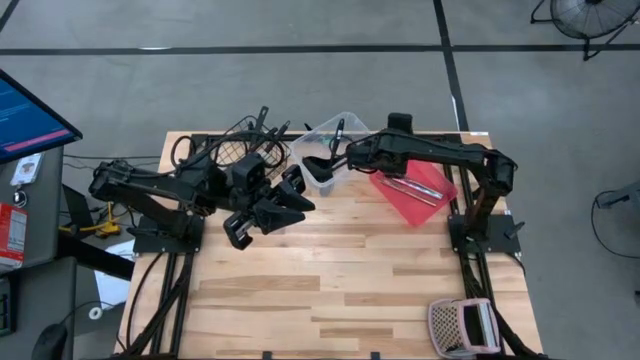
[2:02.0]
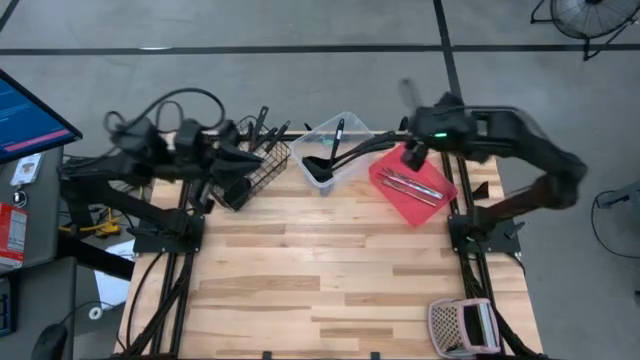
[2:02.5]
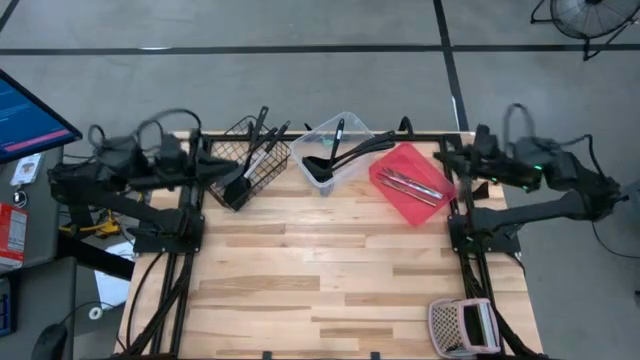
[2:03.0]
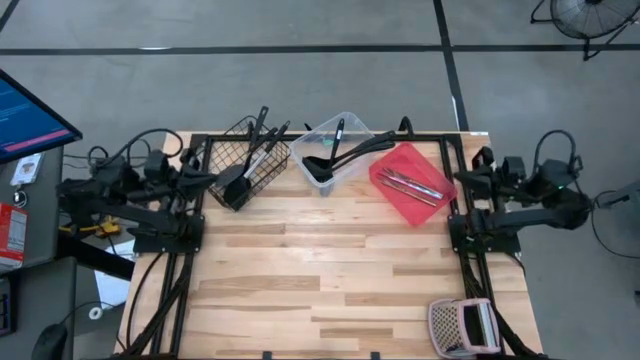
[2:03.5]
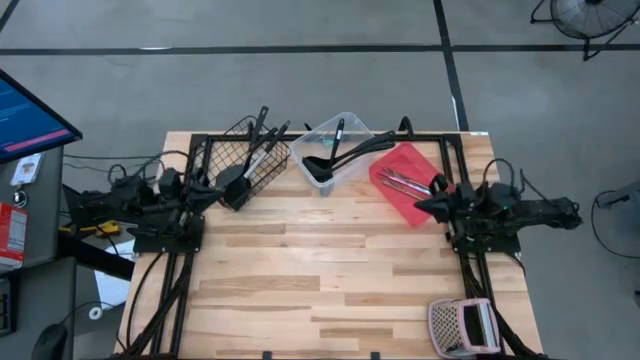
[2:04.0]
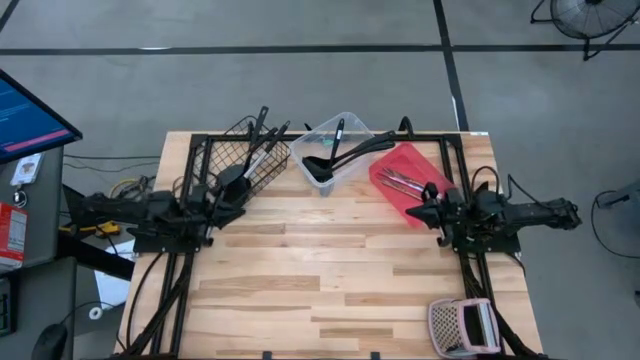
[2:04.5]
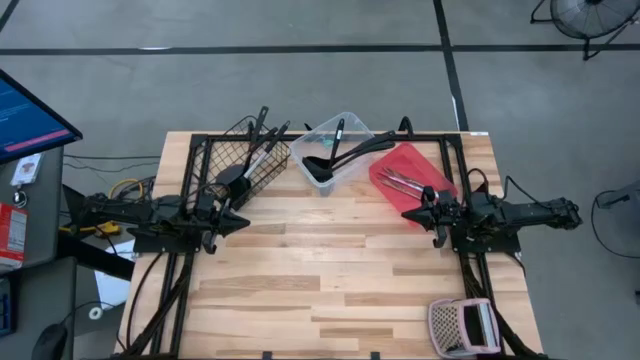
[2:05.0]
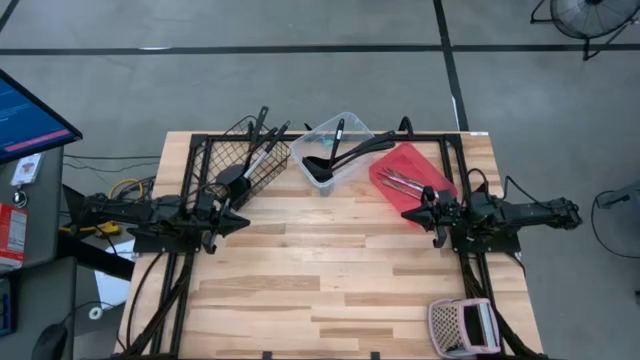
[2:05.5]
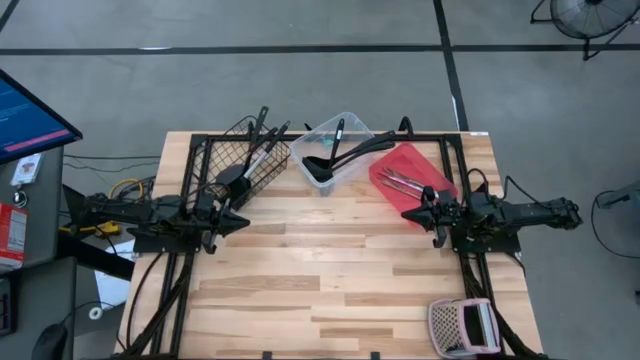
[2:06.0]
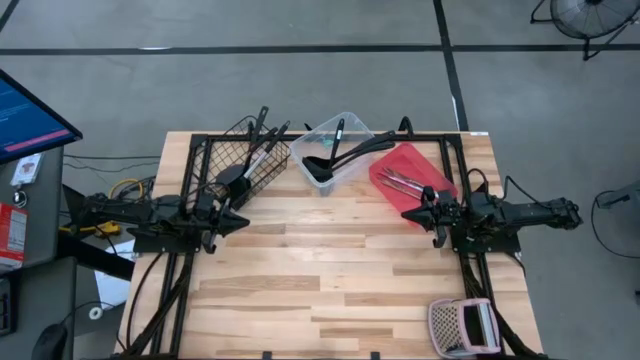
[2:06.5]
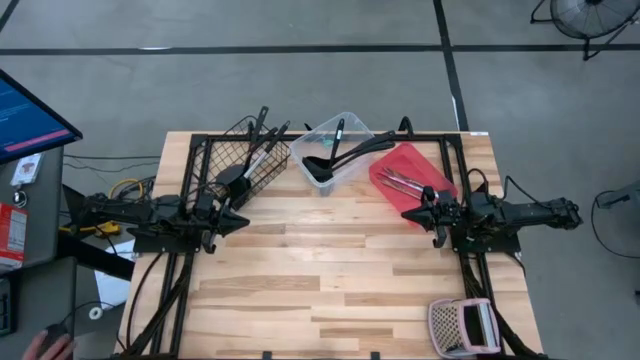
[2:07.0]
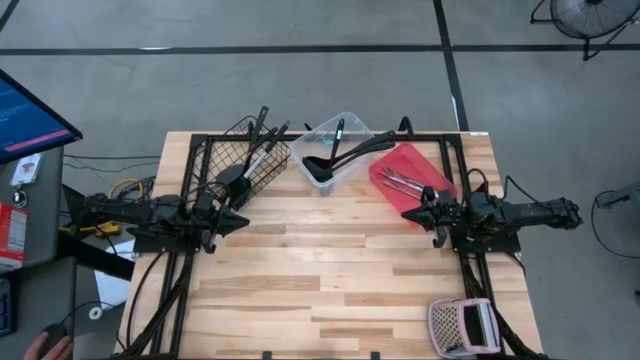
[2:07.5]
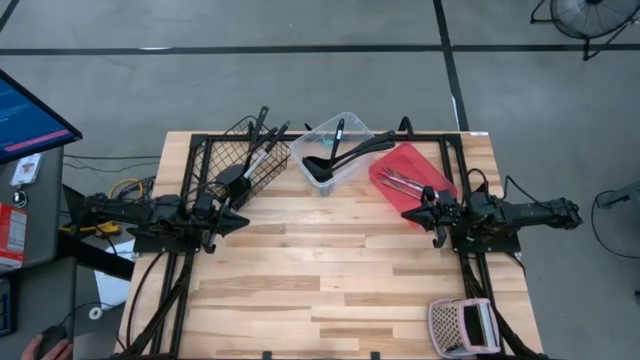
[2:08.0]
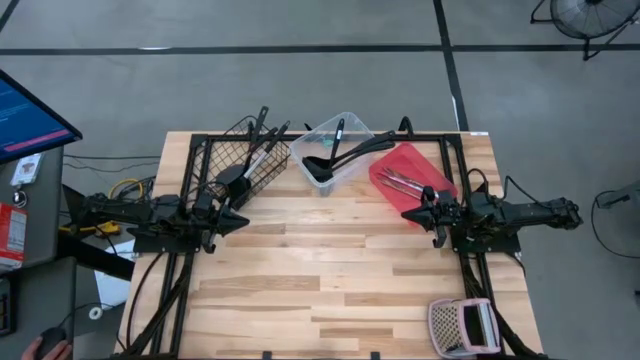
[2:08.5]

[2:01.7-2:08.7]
Task: Pick & Place Kitchen Items
Return to Home Position

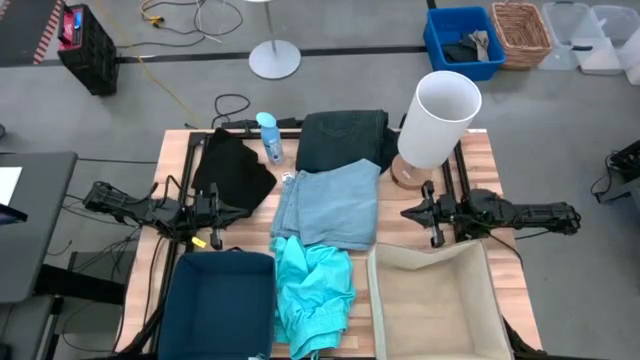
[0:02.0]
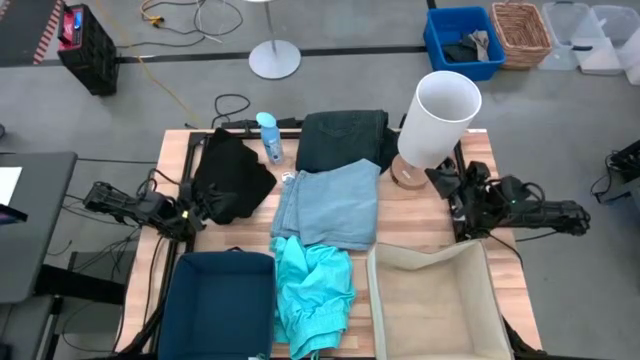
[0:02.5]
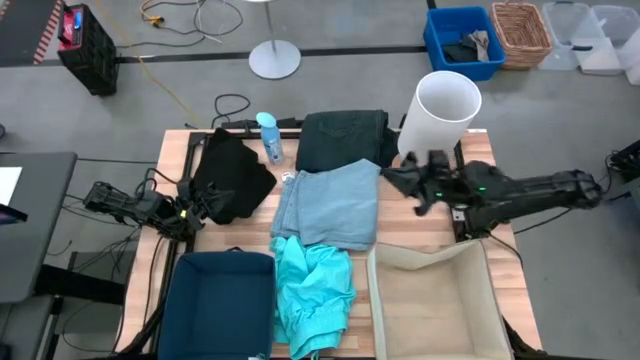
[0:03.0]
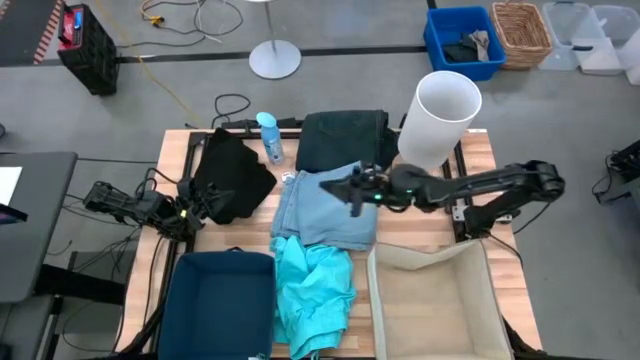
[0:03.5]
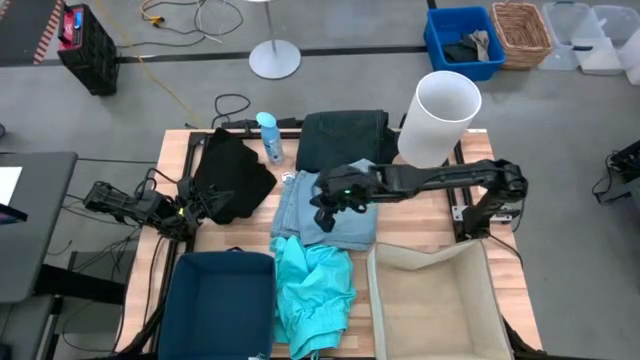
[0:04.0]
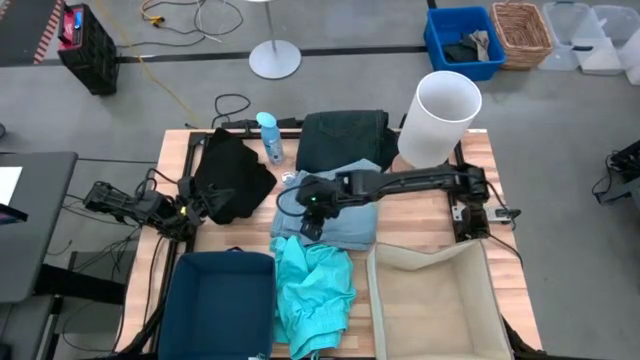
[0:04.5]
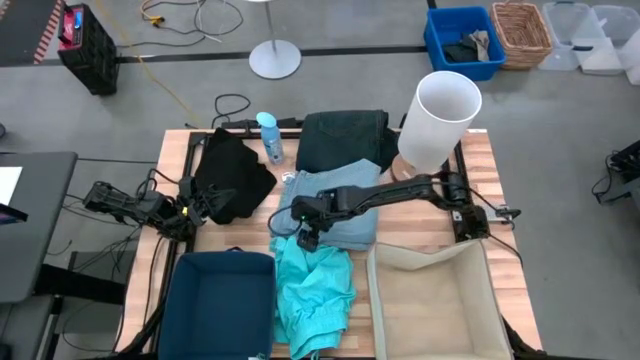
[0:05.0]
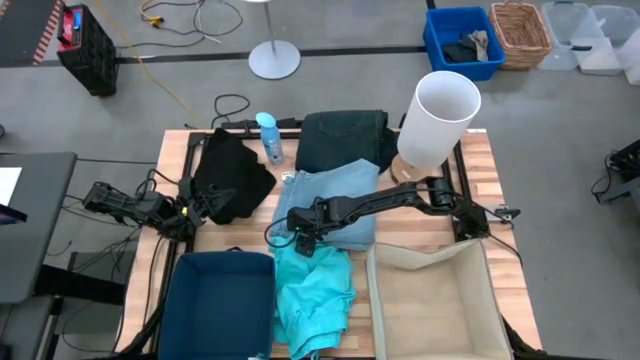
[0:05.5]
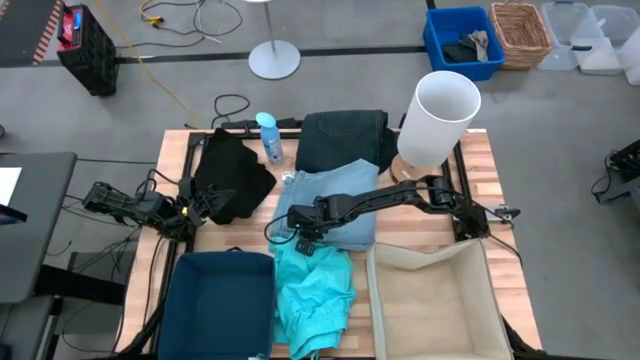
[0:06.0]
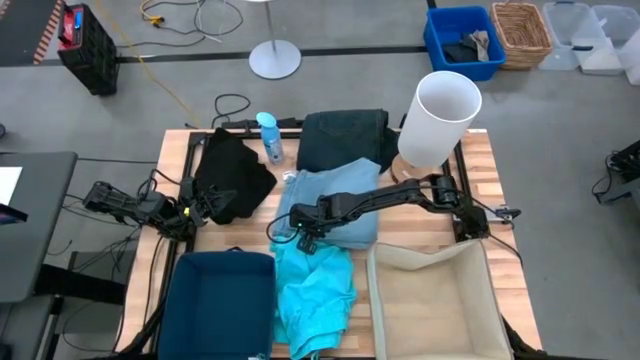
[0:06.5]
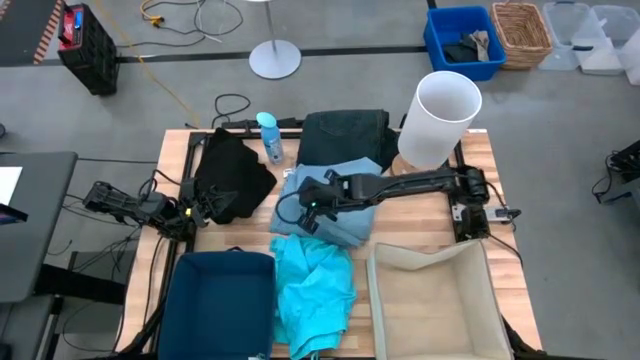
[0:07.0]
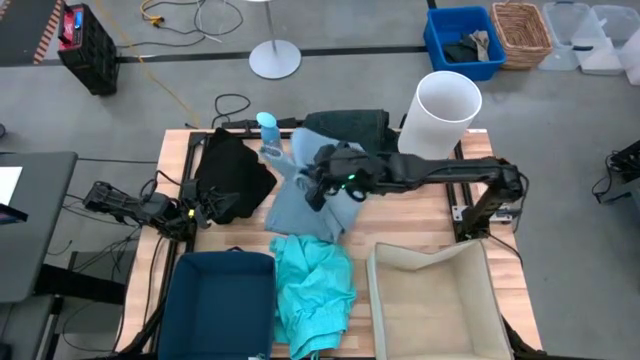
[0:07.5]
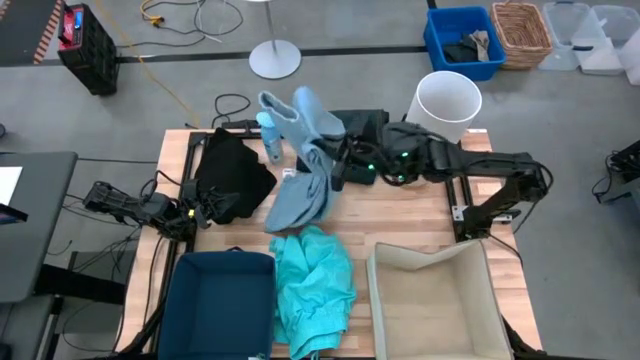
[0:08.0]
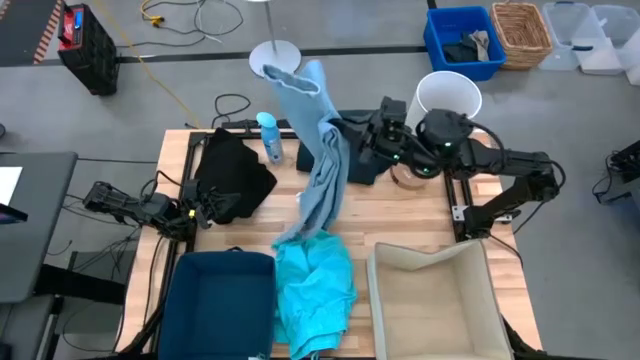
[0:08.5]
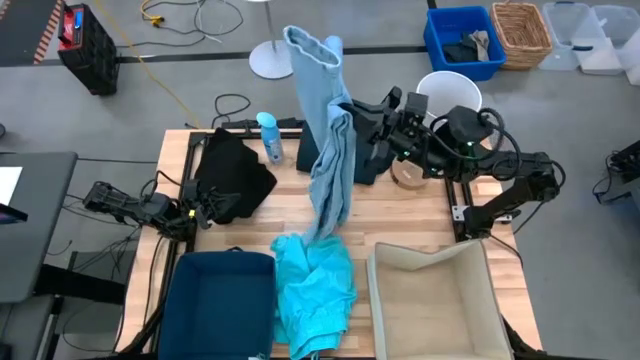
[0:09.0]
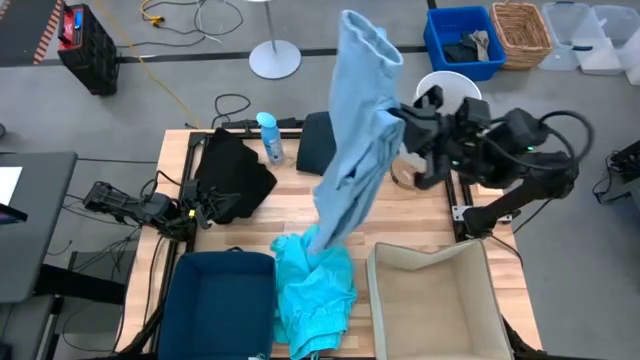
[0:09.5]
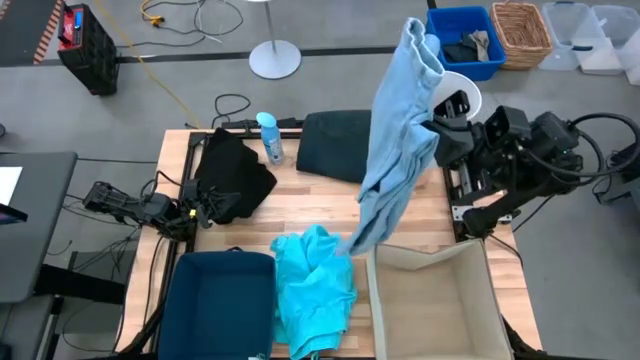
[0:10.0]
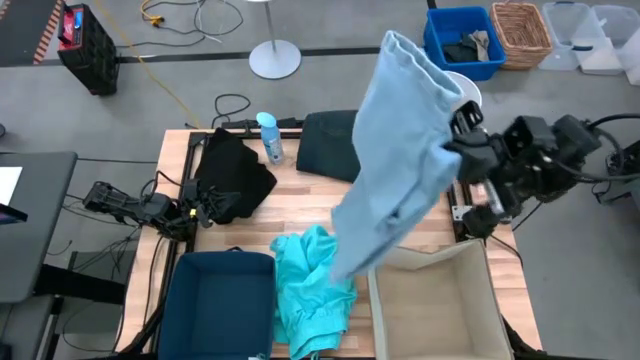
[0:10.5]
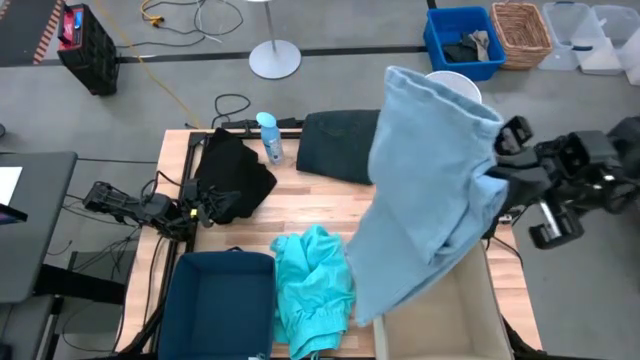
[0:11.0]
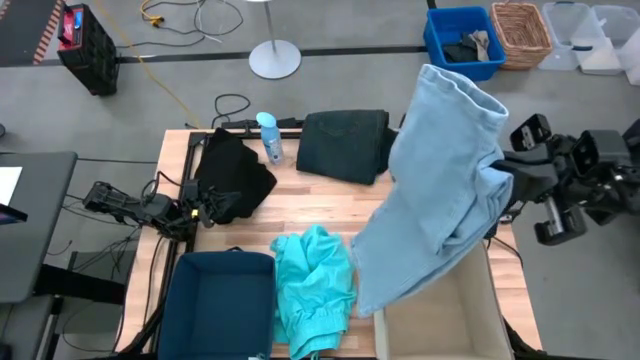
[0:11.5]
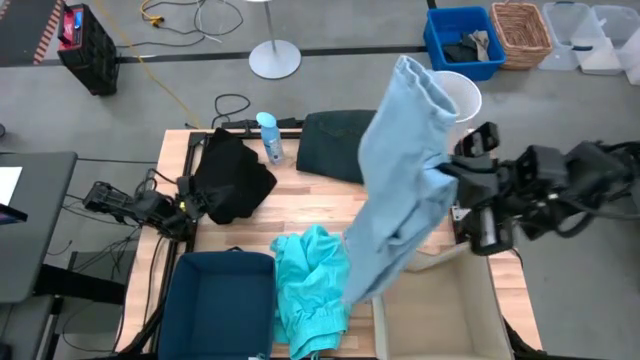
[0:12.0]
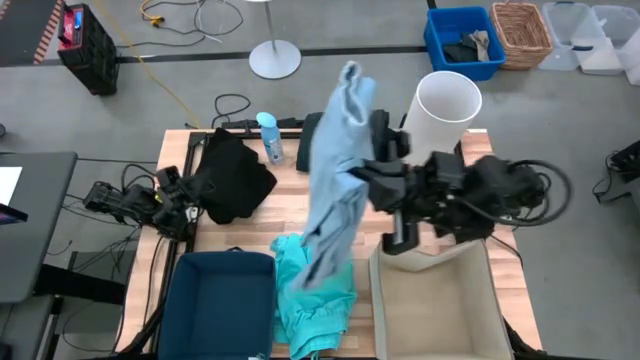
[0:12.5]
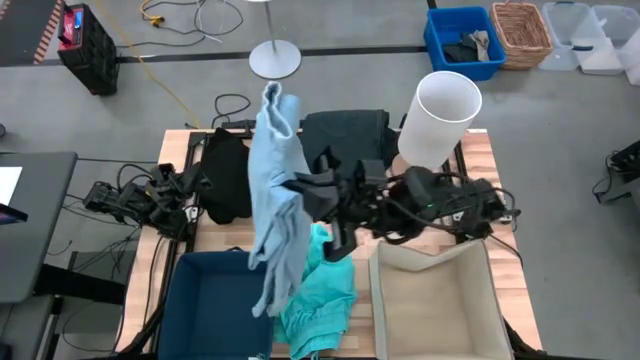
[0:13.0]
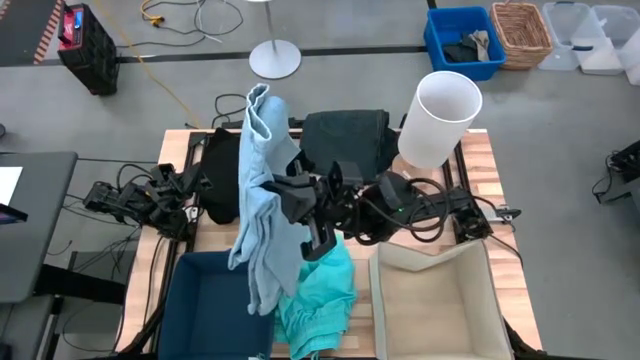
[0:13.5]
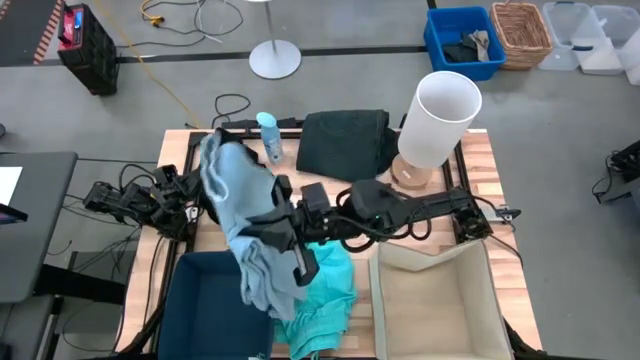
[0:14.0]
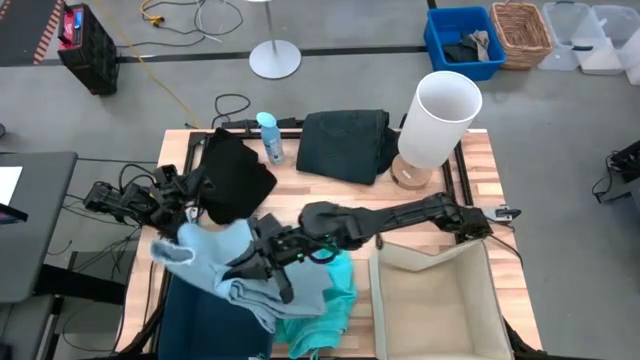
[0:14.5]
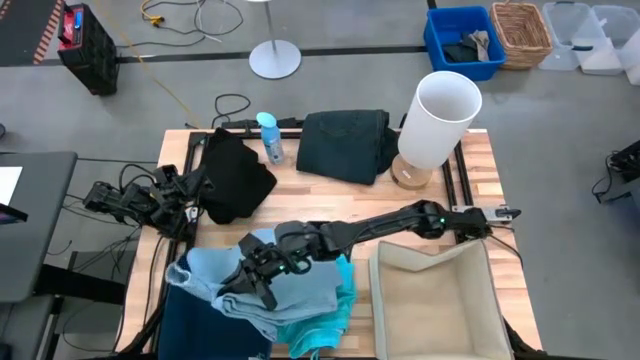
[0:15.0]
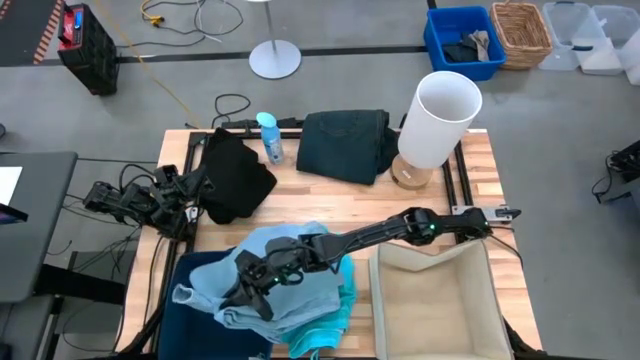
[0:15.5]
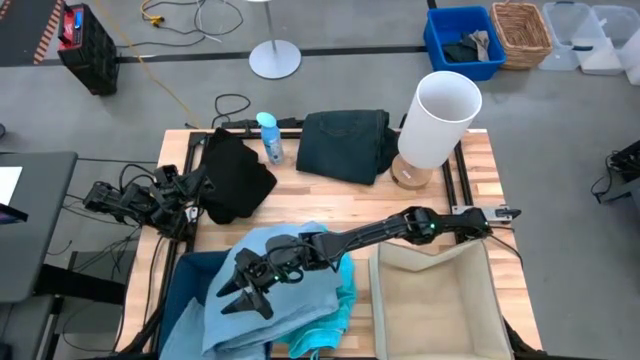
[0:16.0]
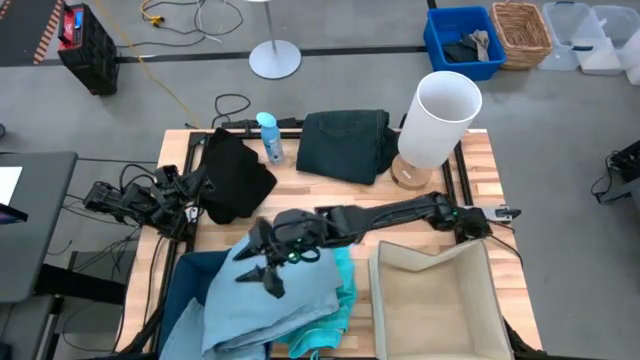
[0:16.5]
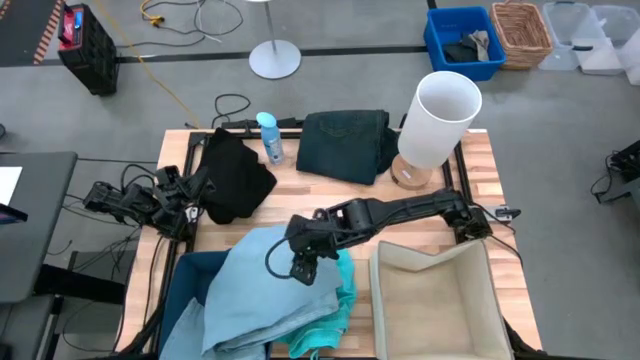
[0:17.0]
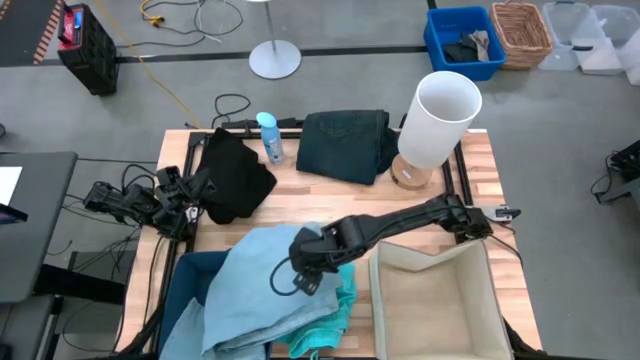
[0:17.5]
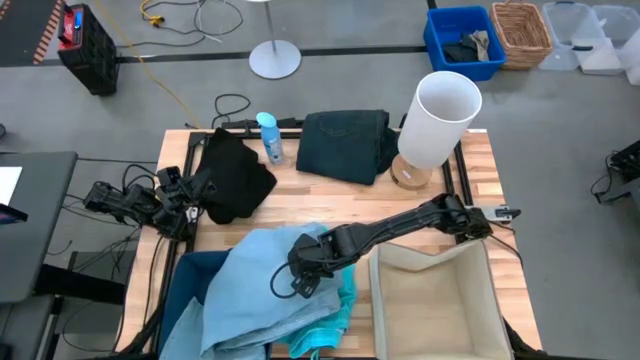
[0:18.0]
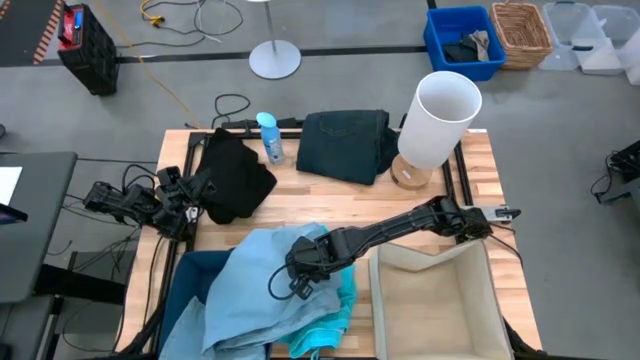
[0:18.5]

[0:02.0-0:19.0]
Task: Sort clothes
Put the light blue jeans into the blue laundry organizer
